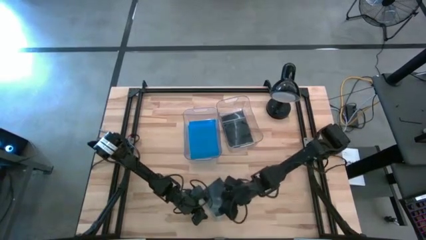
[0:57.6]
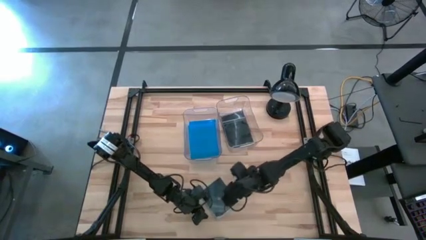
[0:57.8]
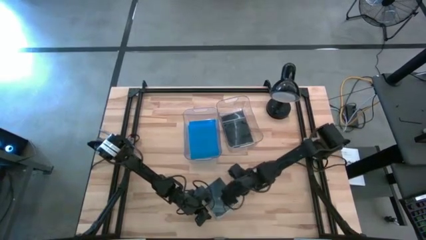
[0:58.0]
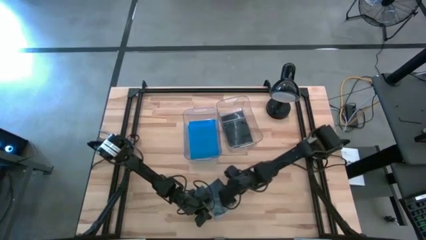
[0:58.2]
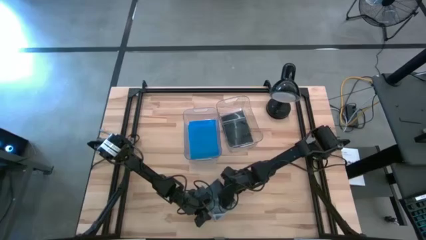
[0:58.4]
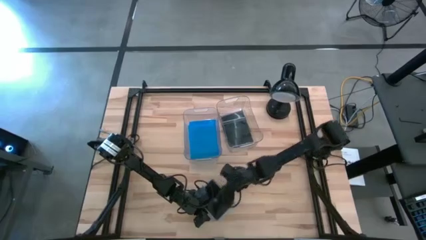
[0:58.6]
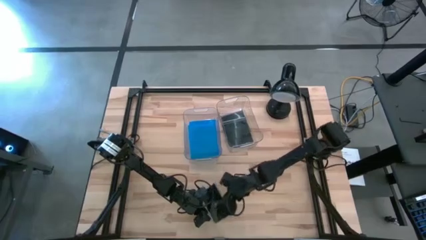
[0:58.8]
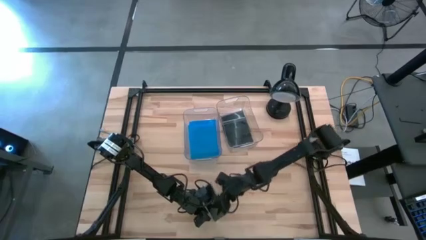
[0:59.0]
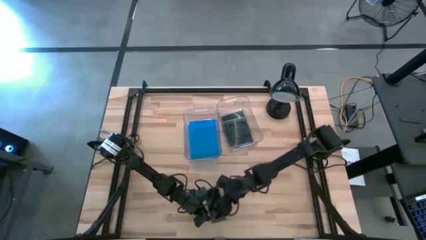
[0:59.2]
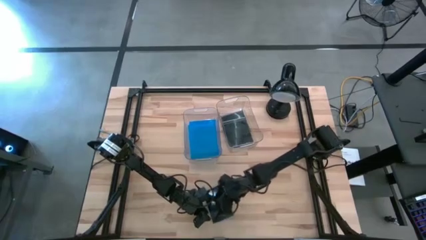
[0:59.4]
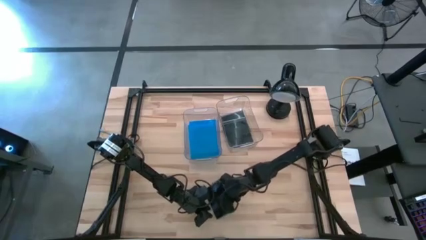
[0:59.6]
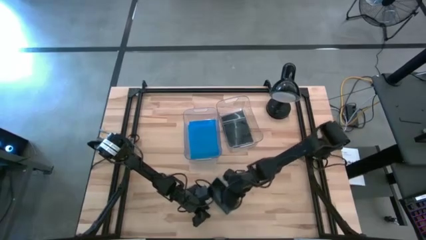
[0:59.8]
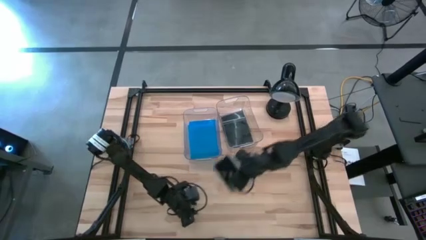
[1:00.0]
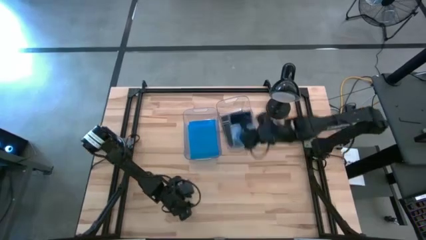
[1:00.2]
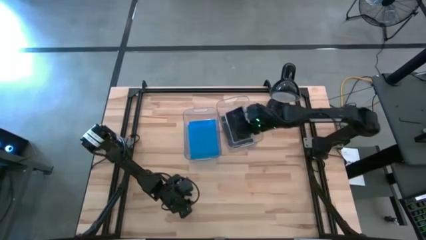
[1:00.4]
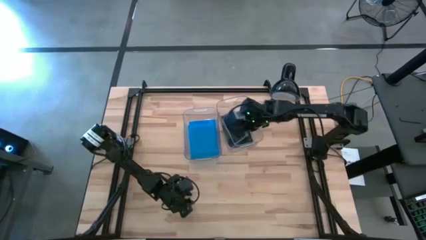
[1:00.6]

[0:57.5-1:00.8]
Task: Pick & place jewel cases by type
Put the black CD case into the right transparent bin

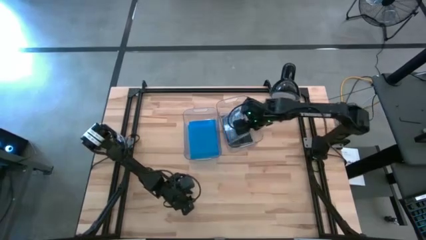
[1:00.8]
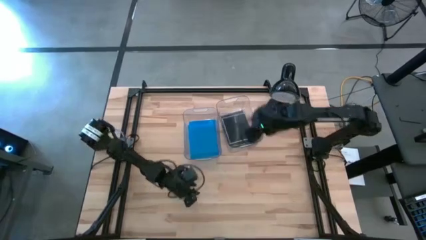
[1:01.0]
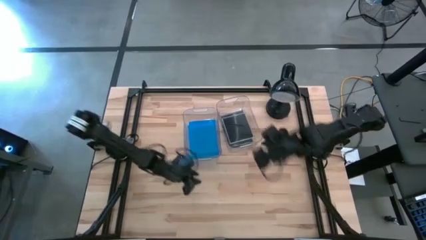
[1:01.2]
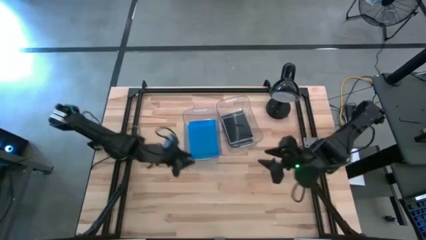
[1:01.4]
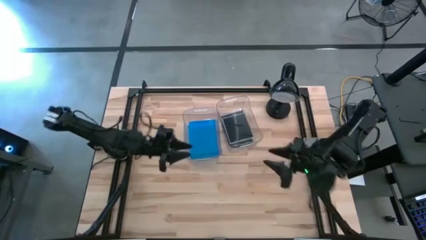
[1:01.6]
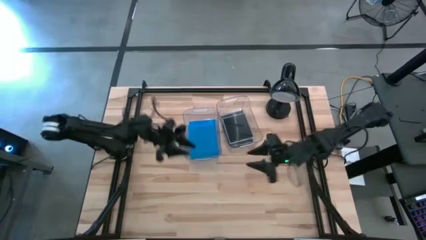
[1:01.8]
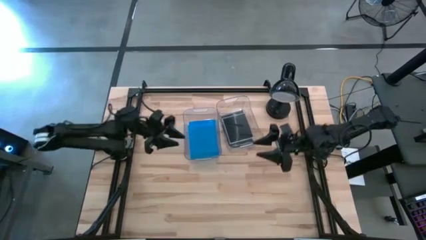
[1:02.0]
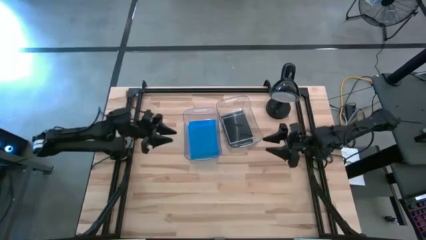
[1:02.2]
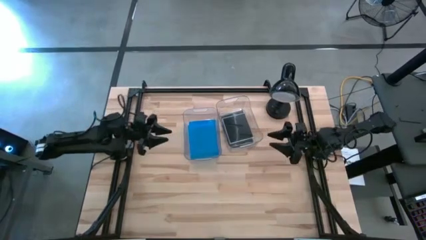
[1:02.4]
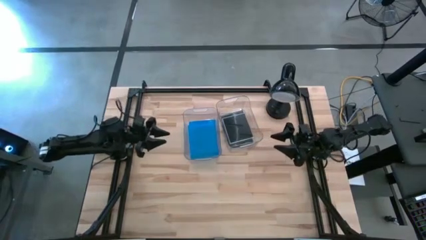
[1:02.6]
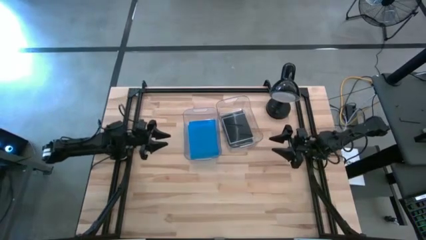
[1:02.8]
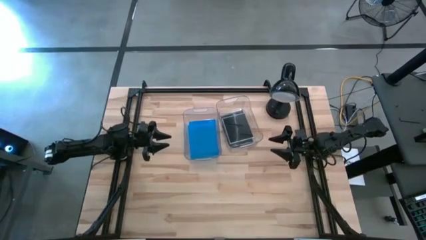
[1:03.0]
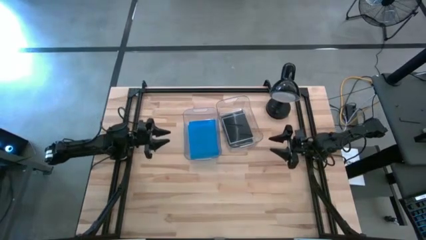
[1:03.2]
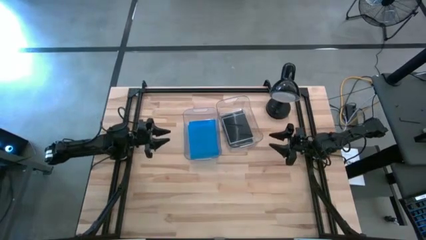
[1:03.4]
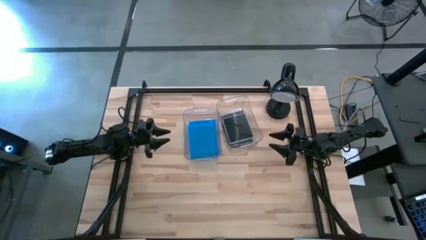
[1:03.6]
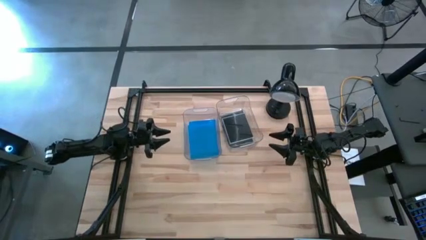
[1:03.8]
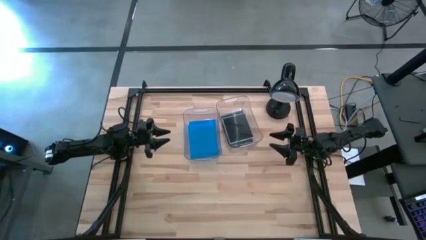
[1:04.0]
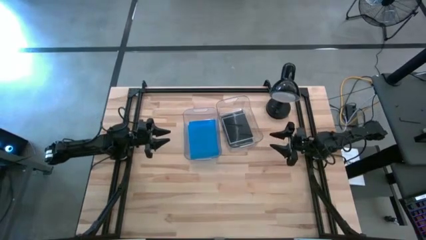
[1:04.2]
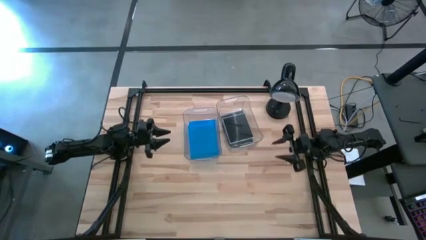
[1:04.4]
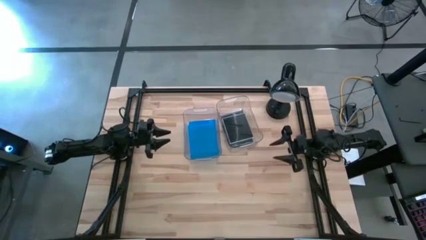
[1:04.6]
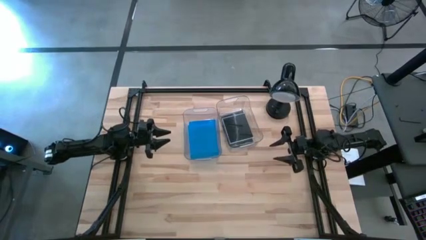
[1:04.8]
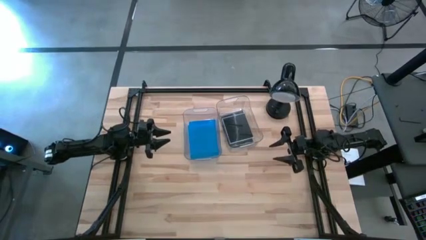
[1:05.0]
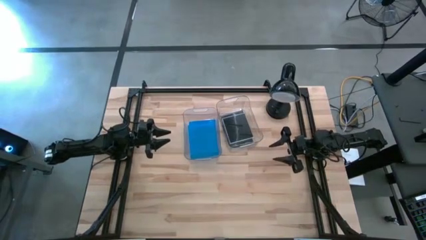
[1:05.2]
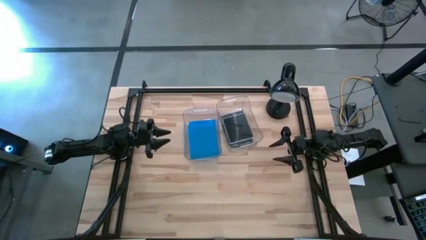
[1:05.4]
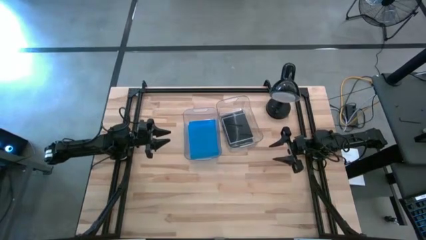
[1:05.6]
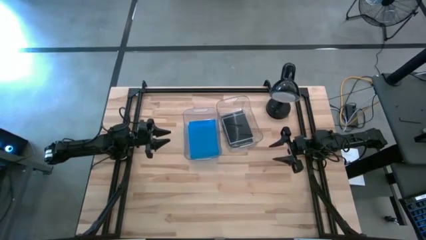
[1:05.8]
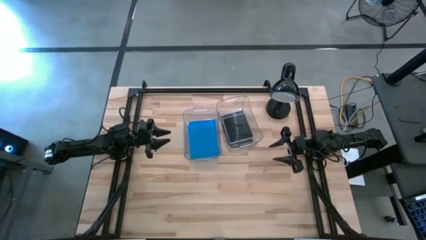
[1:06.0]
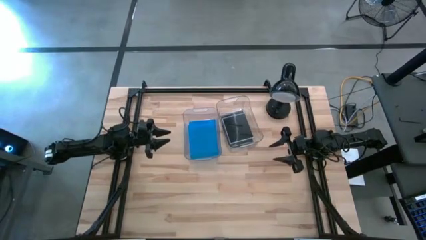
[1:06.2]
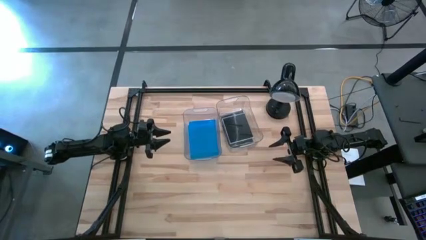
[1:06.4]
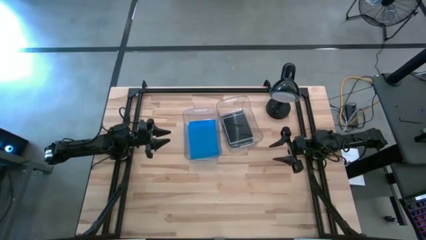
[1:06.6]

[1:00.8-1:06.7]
Return to Home Position

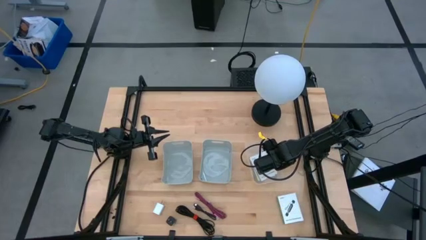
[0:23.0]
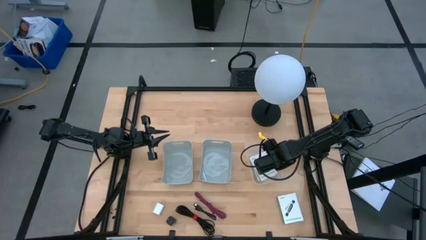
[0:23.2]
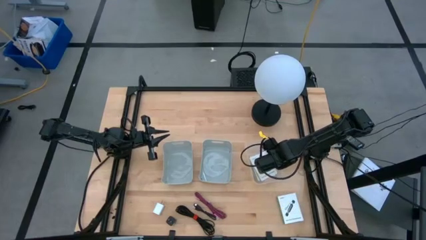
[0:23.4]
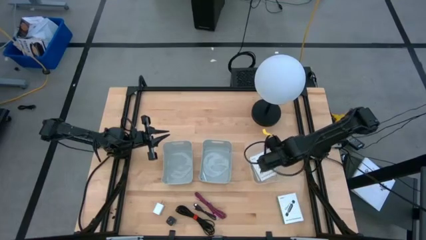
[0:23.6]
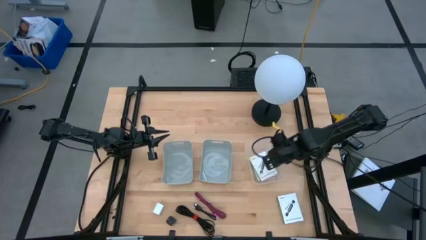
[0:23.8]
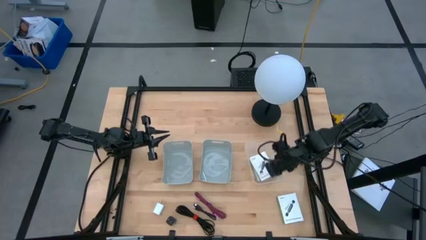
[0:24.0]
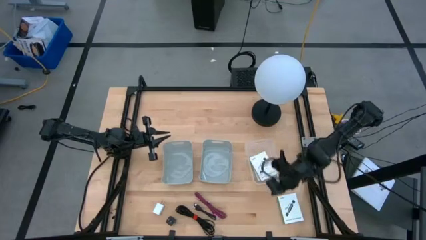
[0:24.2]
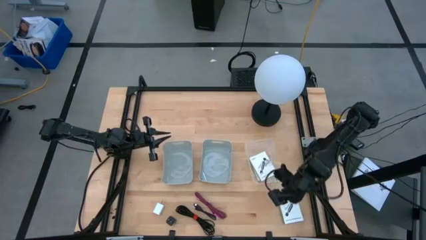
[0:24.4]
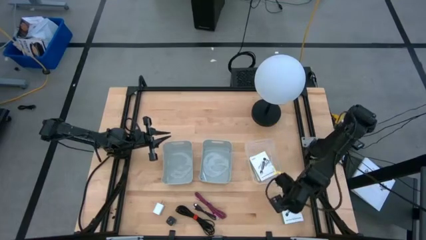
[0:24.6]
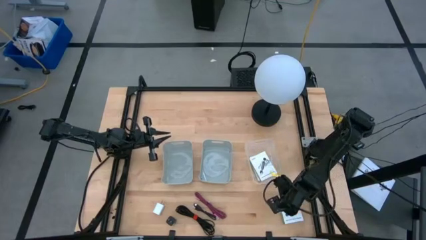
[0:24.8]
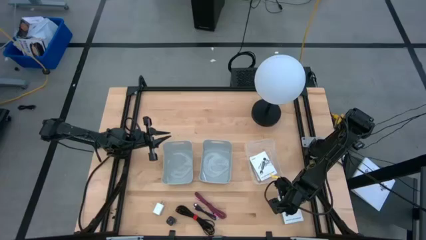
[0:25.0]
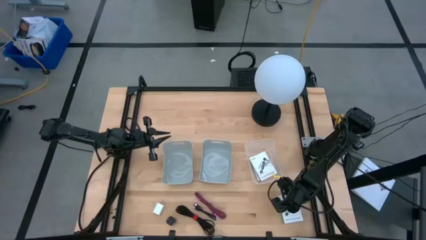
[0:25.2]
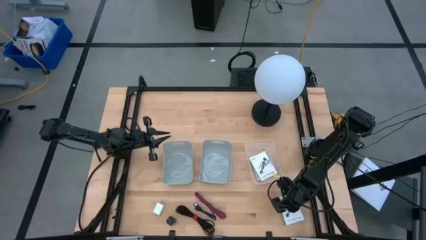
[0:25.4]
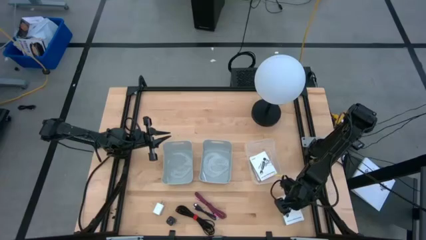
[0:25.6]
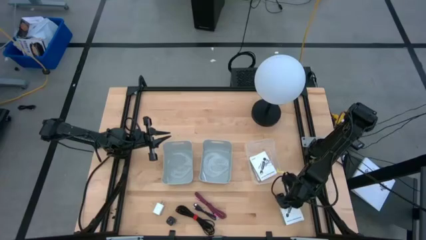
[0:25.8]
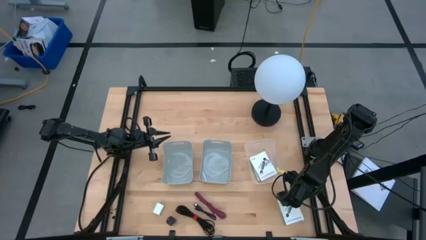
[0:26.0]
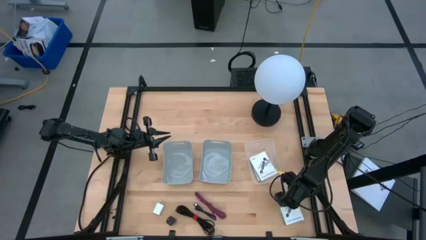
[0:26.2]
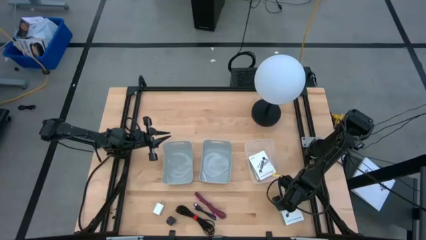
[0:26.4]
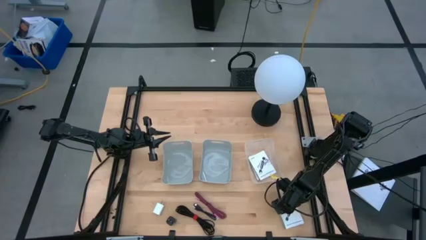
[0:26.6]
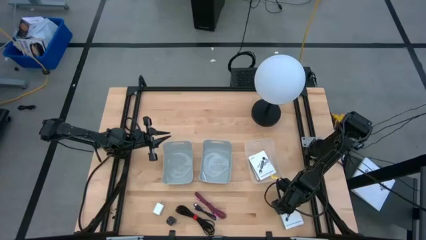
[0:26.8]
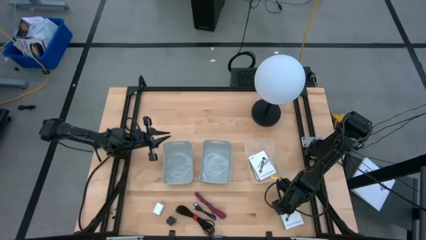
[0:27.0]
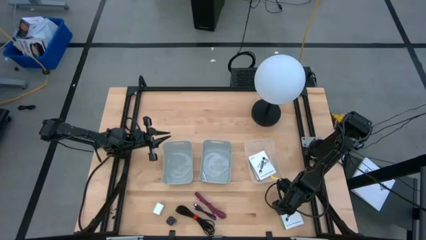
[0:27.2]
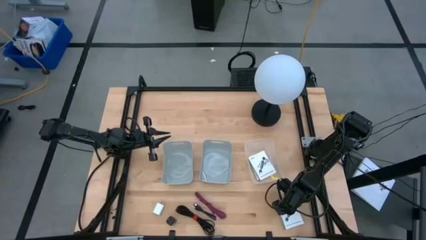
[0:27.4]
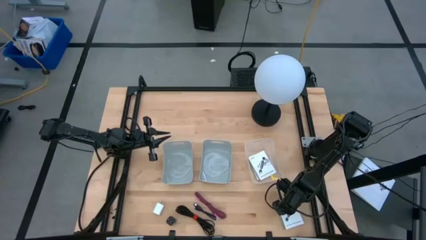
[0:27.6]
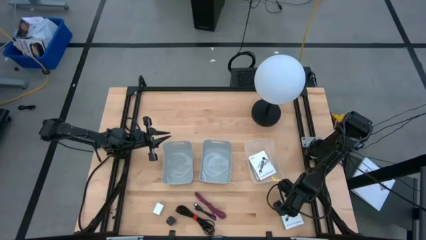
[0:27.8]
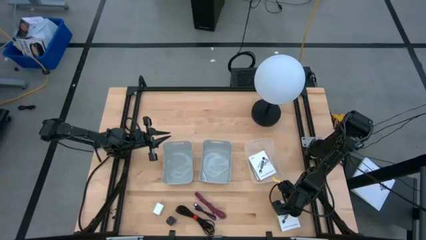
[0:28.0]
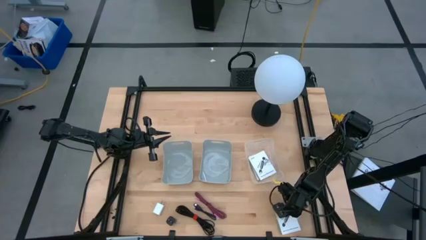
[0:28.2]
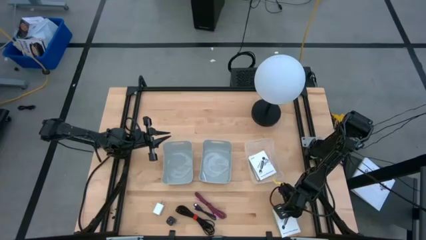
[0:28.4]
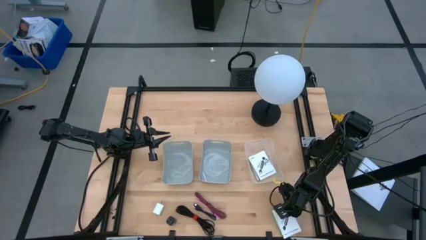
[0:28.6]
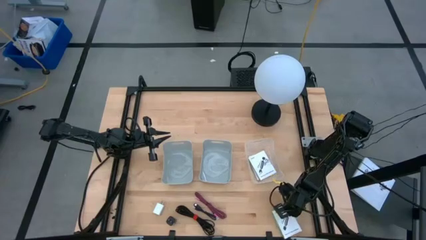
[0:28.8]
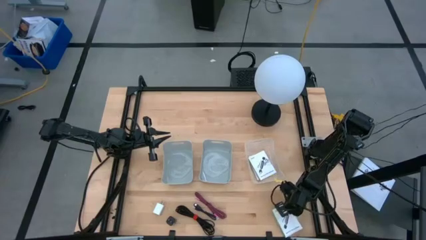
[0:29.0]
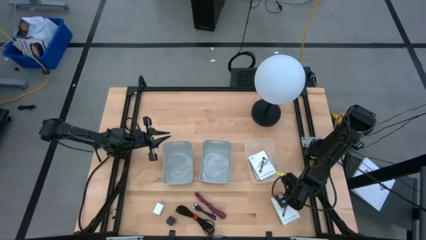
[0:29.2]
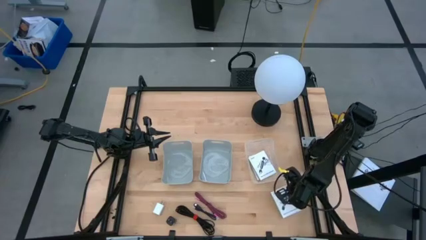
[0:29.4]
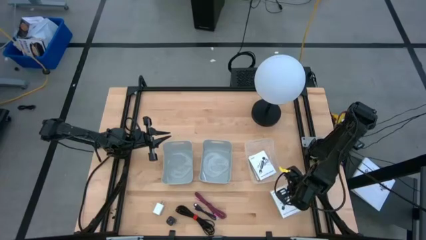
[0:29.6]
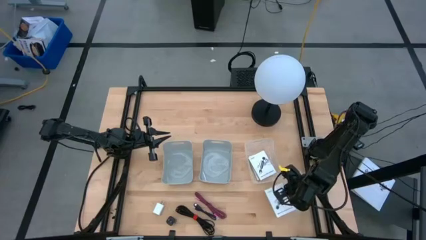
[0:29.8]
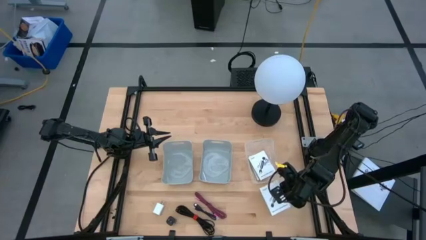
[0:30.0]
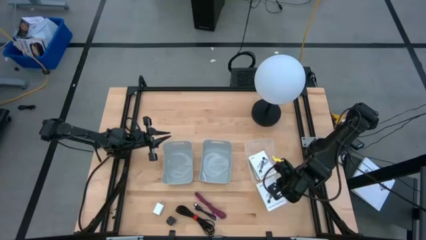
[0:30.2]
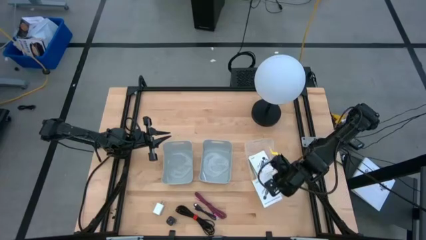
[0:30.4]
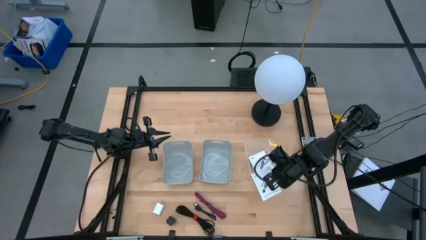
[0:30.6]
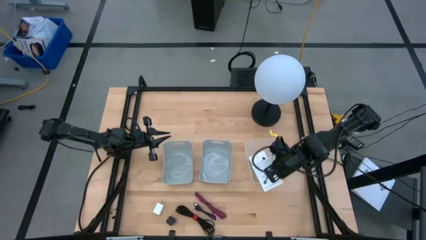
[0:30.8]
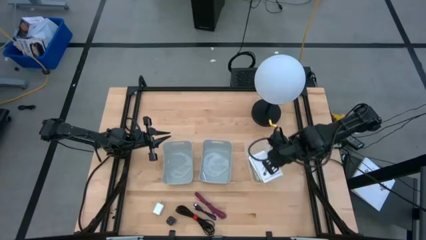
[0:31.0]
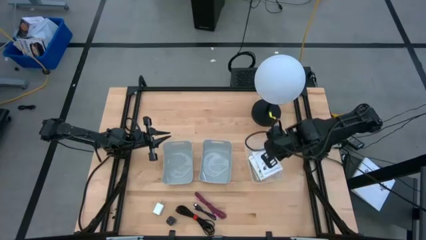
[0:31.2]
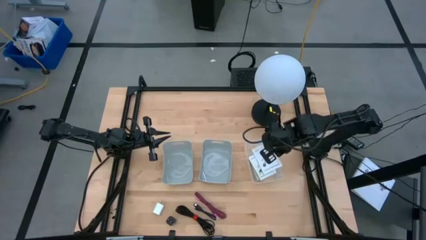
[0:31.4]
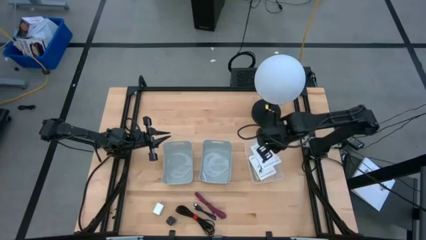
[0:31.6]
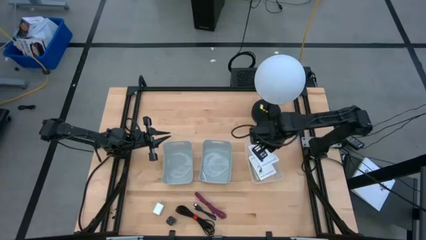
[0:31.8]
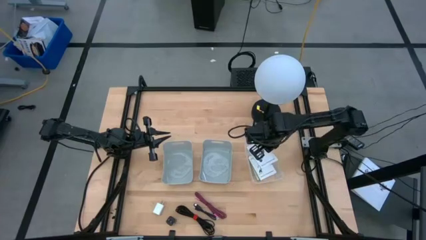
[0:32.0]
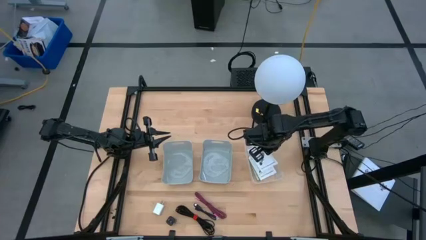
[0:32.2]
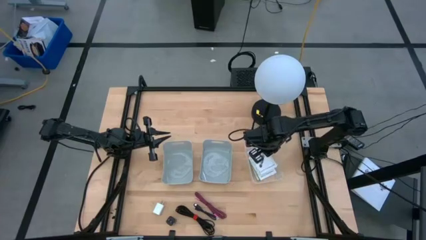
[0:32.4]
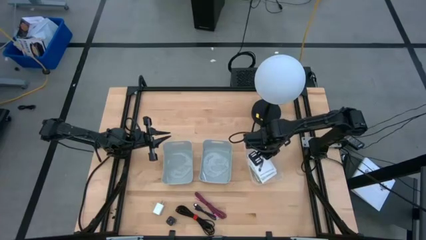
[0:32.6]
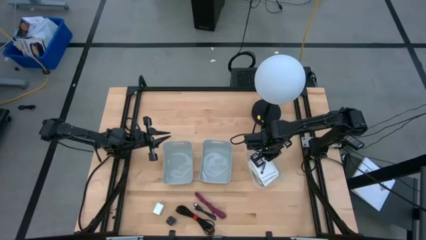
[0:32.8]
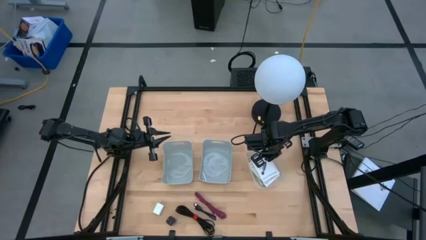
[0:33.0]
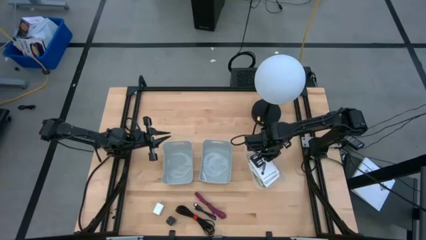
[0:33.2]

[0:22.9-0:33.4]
Task: Pick and place items into bin
Put the white card reader box into the transparent bin
